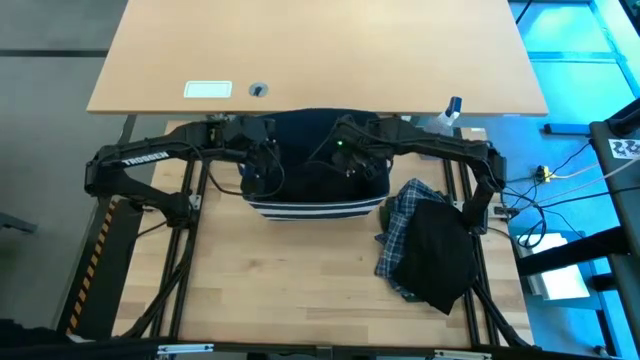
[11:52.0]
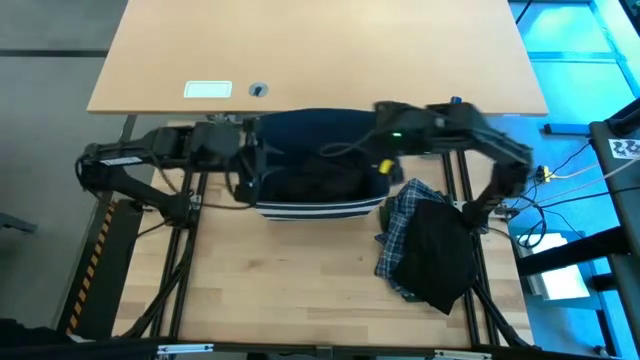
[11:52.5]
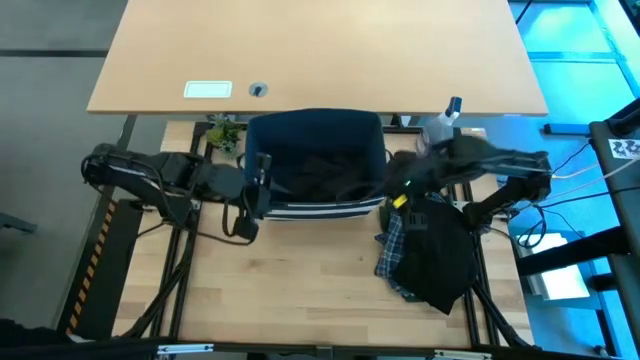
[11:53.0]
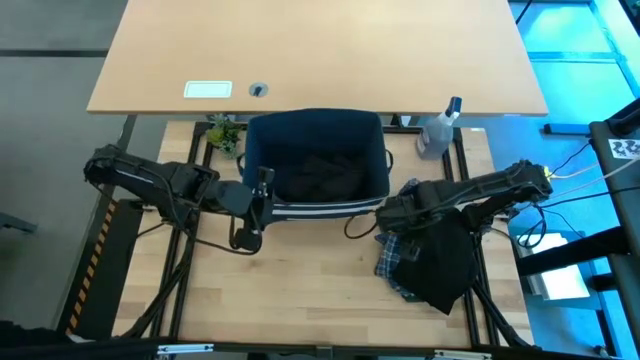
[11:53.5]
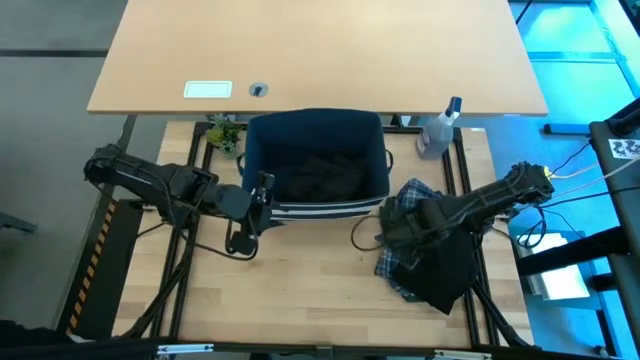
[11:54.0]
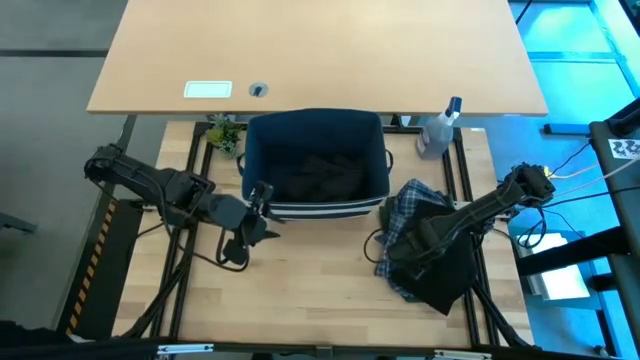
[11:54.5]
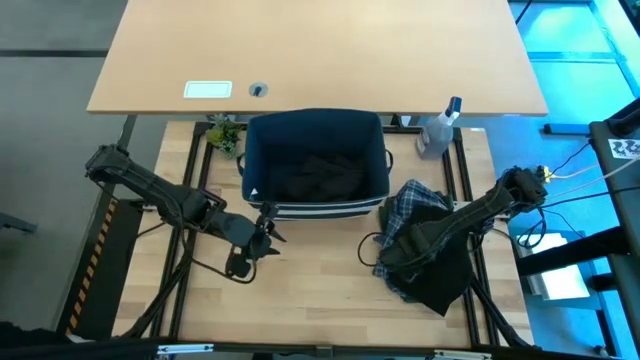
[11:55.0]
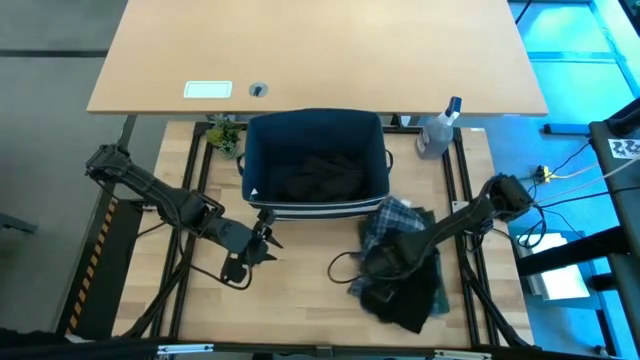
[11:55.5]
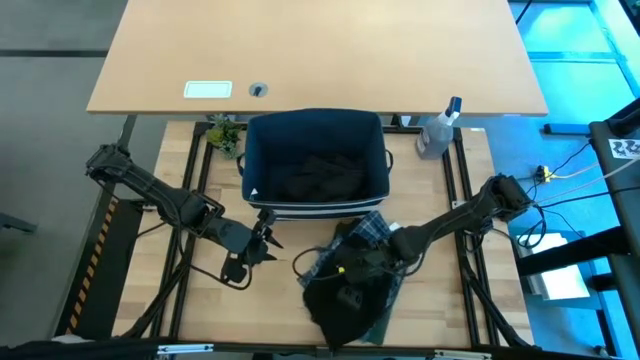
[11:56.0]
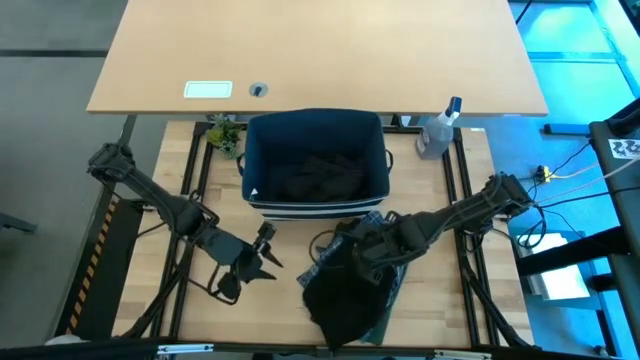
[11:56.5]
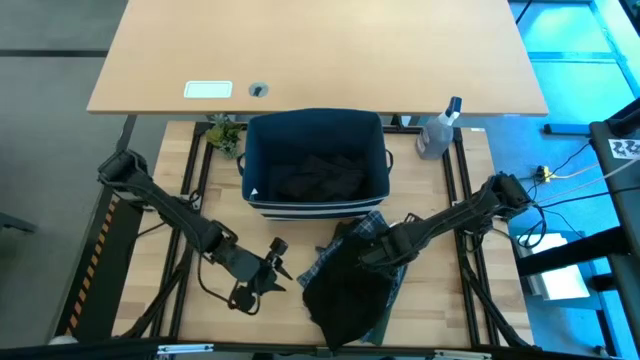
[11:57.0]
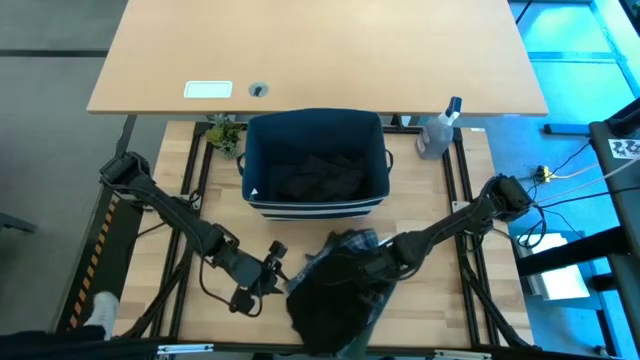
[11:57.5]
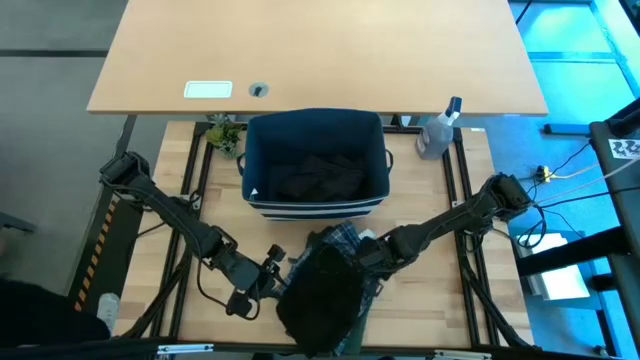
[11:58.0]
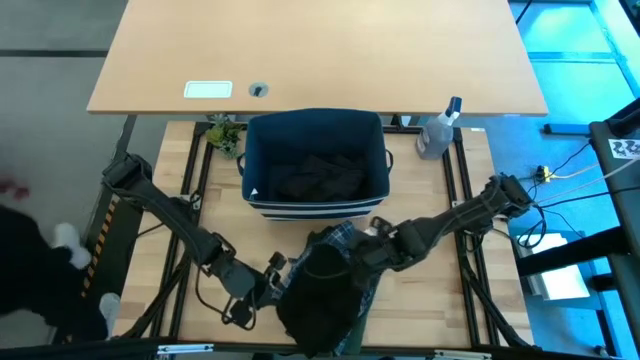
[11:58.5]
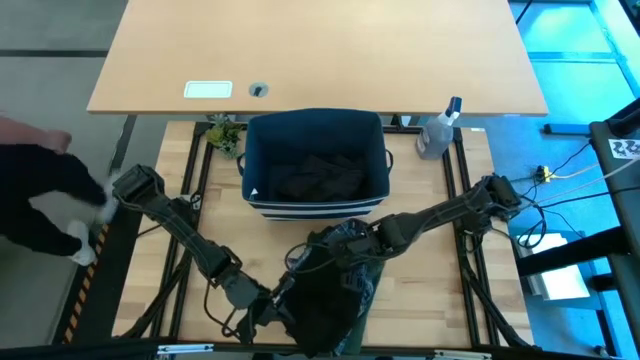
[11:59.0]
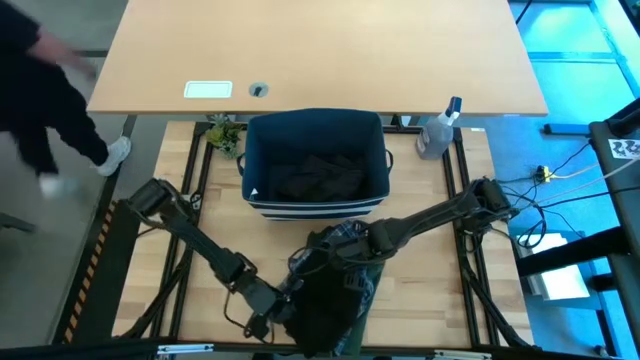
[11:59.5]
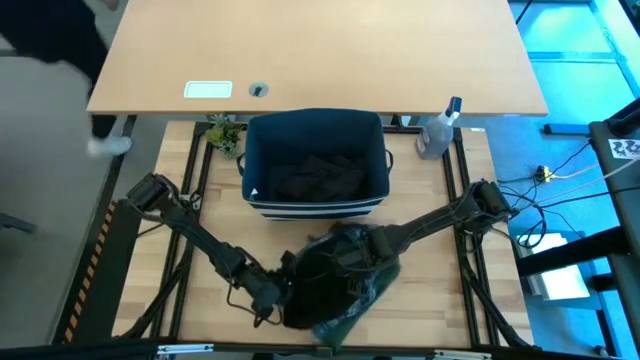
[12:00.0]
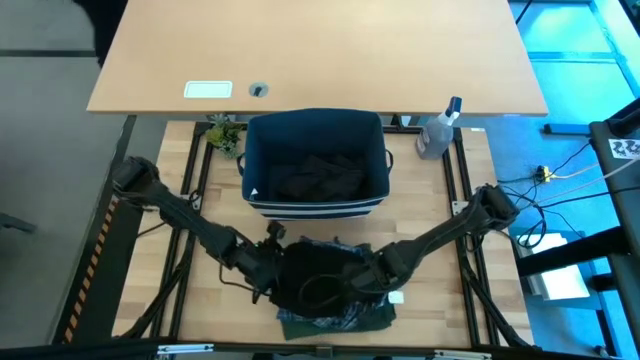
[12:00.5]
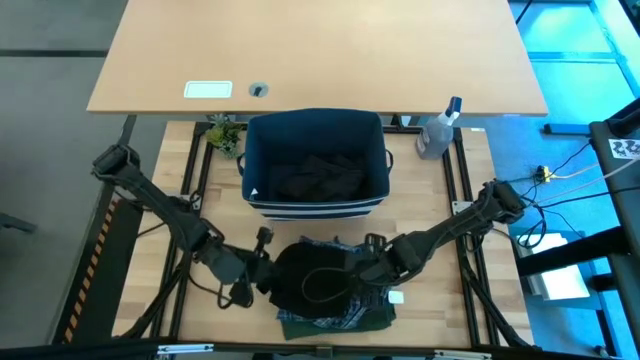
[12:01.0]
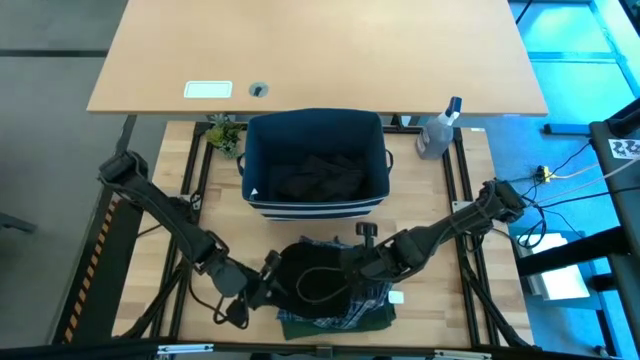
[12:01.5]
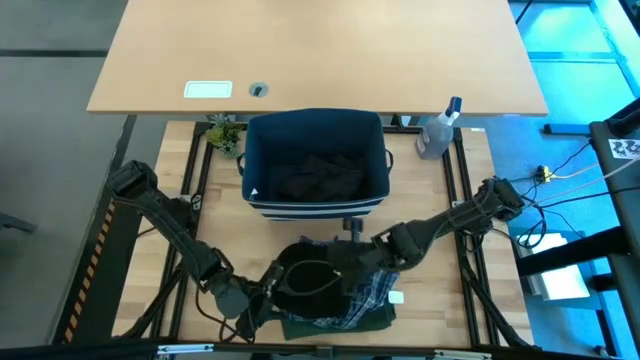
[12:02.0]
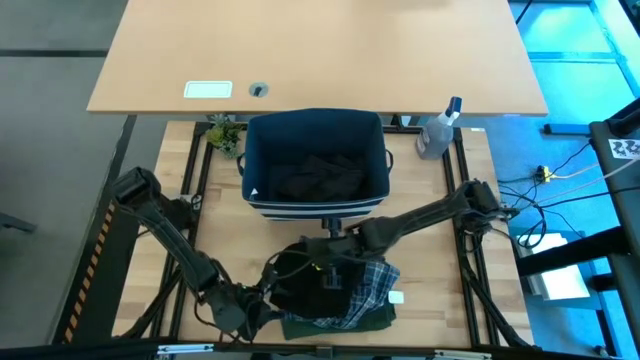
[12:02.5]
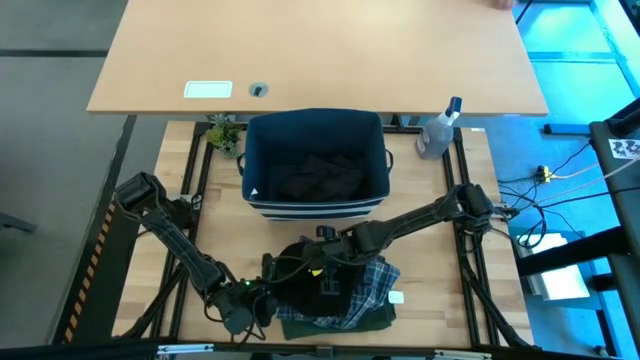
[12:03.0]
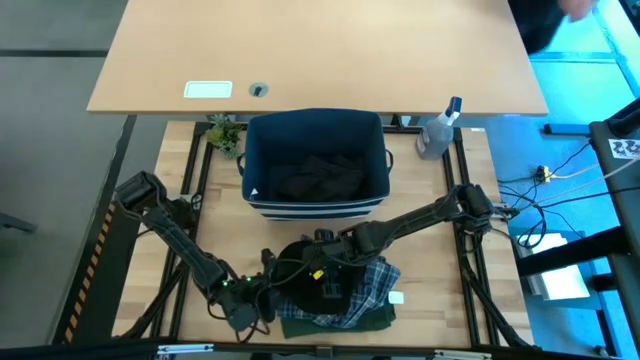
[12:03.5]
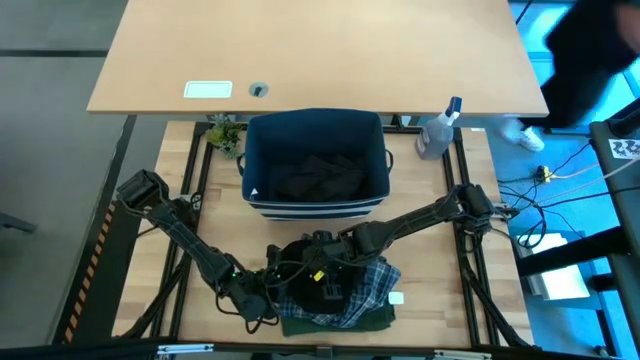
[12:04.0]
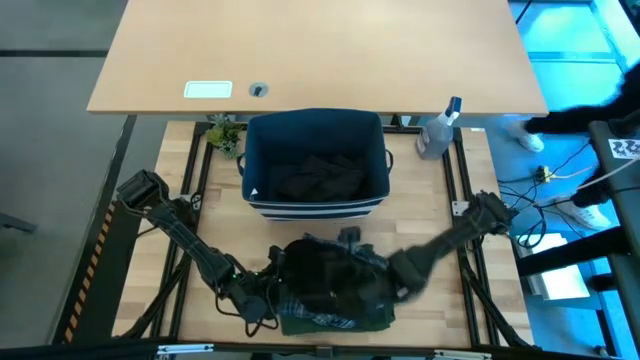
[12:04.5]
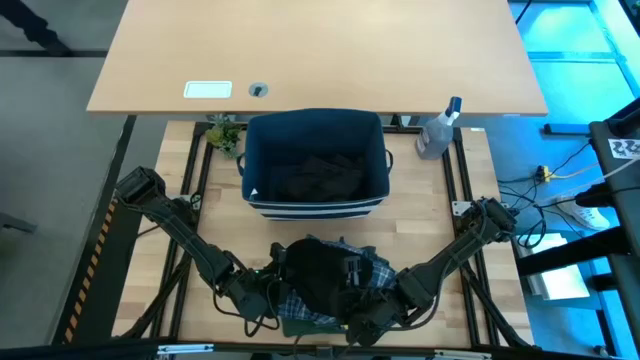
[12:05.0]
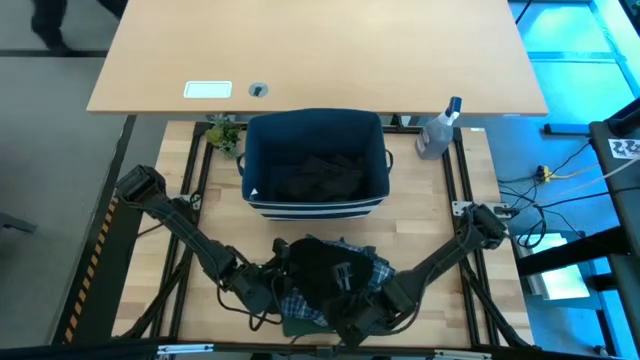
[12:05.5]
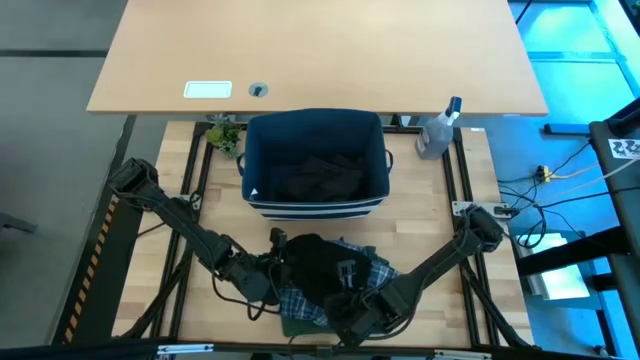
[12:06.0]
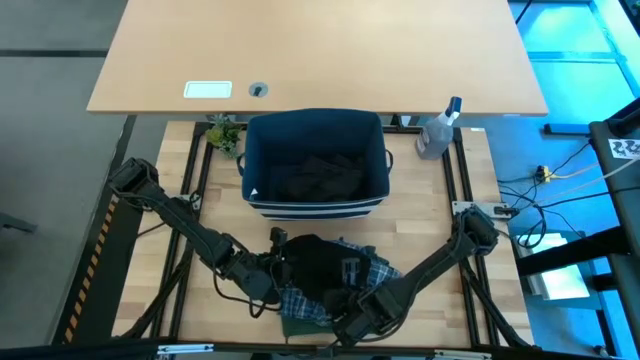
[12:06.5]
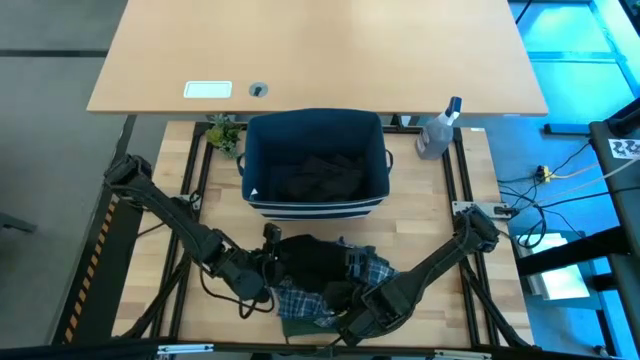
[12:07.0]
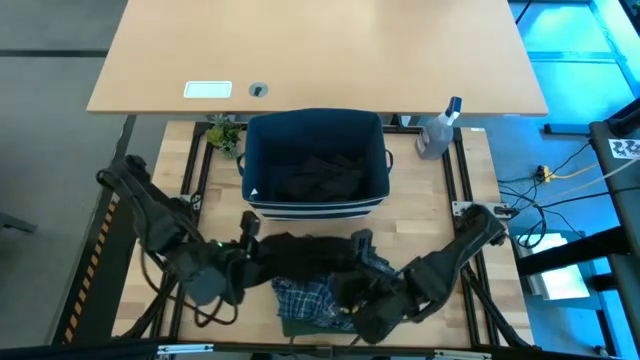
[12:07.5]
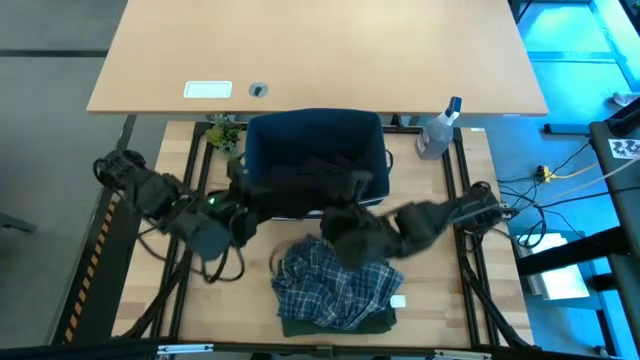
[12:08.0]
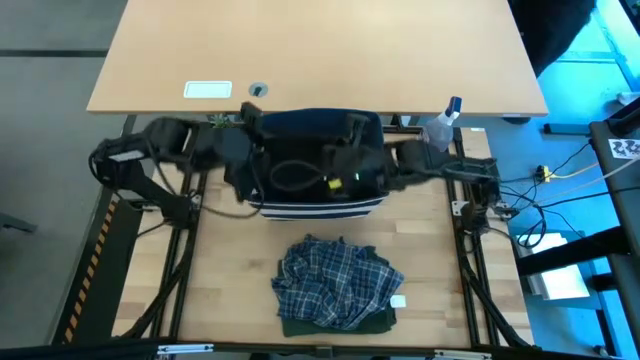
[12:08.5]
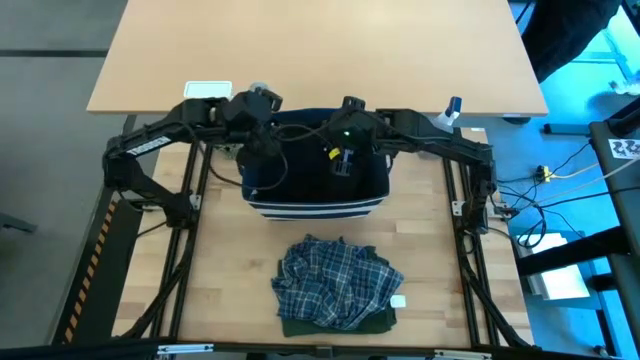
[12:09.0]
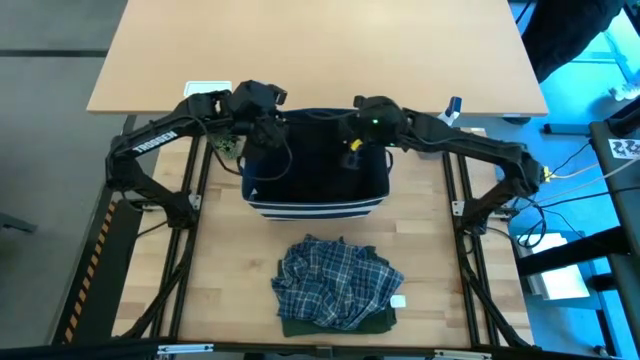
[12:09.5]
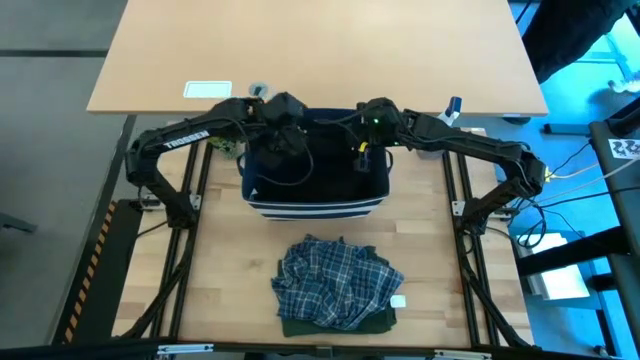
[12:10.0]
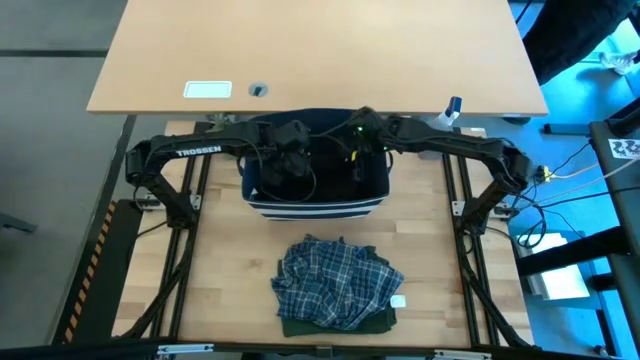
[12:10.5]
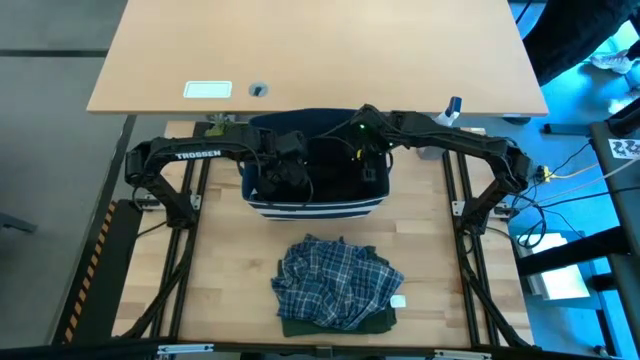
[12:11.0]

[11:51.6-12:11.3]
Task: Fold Laundry from Bin
Put the black shirt into the laundry bin
